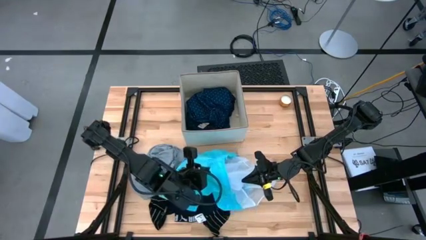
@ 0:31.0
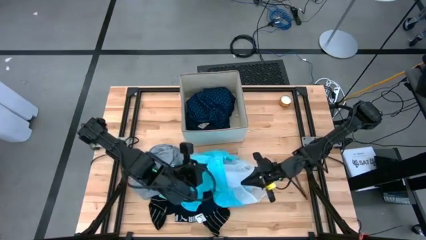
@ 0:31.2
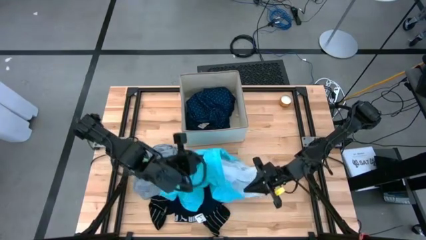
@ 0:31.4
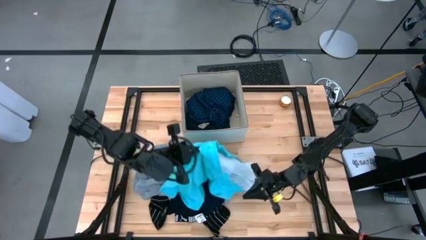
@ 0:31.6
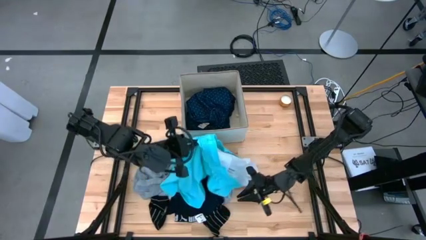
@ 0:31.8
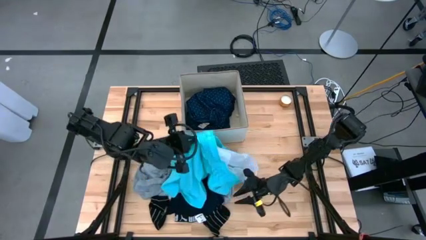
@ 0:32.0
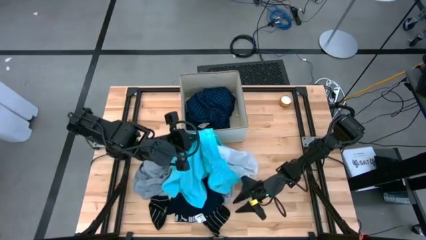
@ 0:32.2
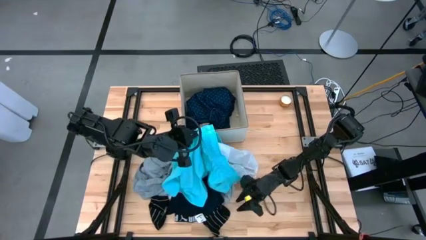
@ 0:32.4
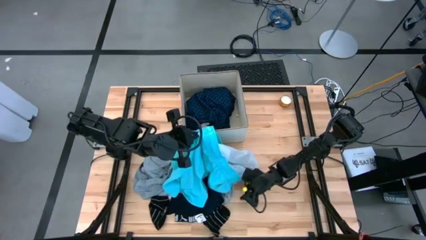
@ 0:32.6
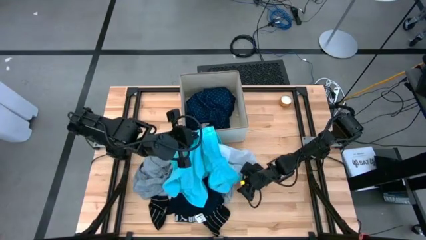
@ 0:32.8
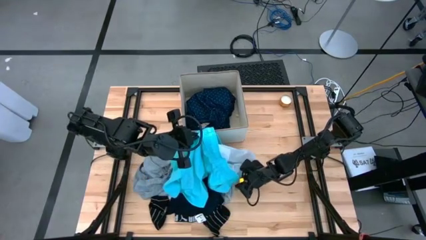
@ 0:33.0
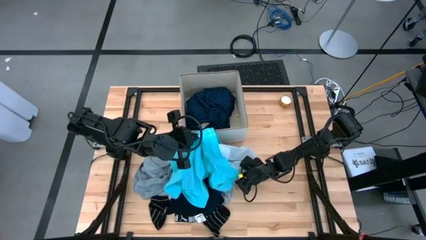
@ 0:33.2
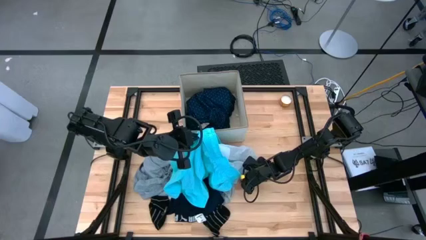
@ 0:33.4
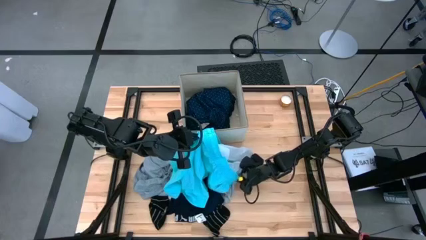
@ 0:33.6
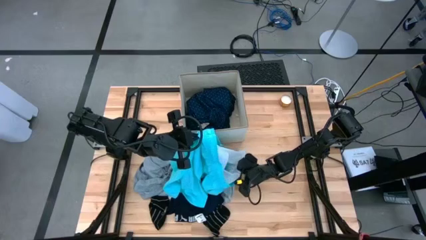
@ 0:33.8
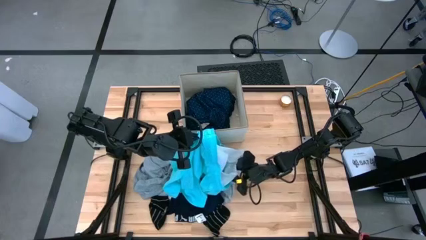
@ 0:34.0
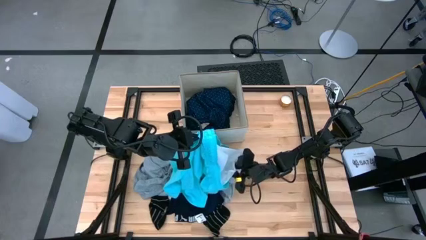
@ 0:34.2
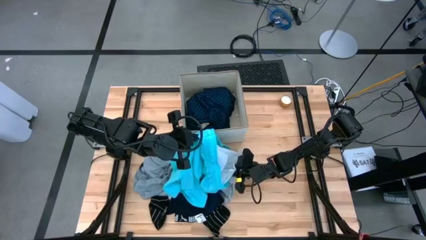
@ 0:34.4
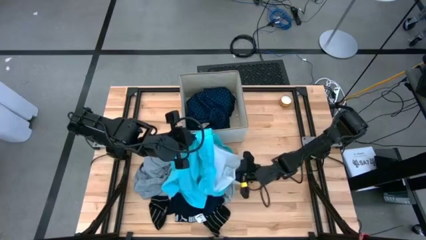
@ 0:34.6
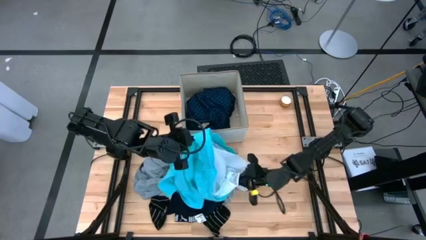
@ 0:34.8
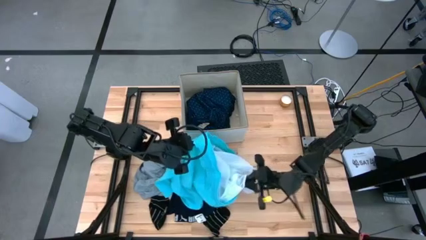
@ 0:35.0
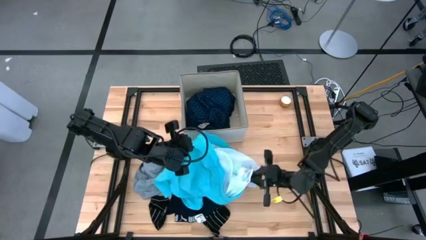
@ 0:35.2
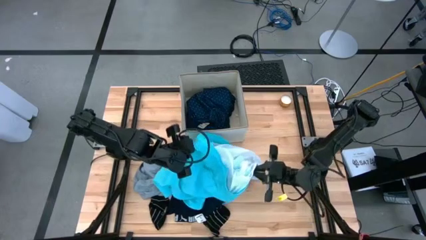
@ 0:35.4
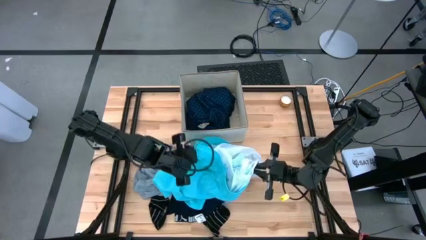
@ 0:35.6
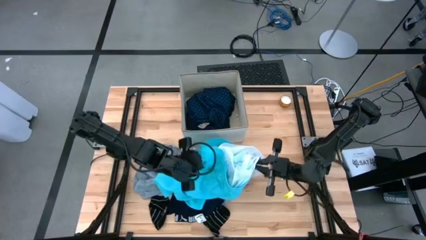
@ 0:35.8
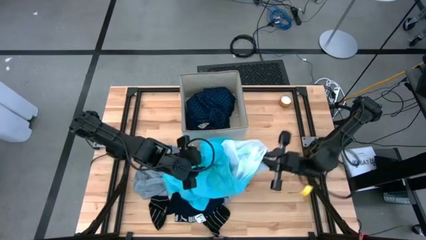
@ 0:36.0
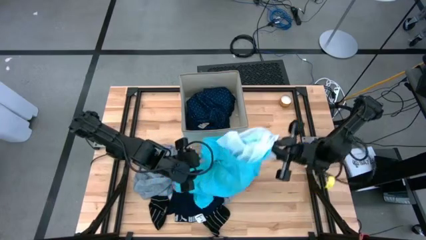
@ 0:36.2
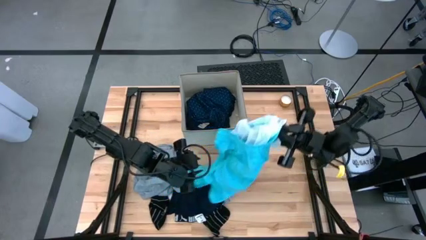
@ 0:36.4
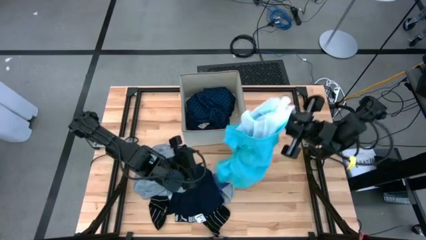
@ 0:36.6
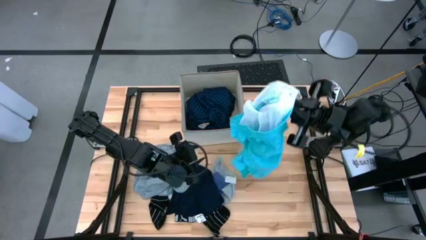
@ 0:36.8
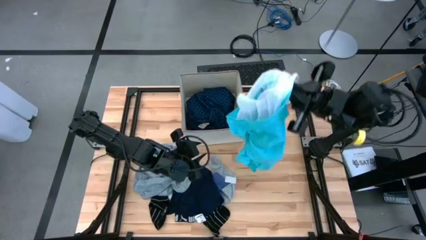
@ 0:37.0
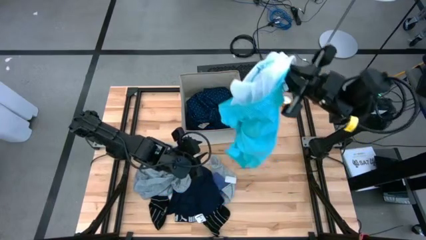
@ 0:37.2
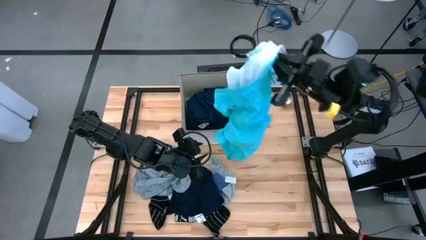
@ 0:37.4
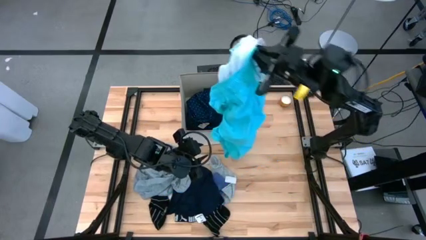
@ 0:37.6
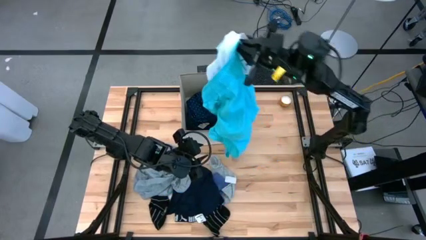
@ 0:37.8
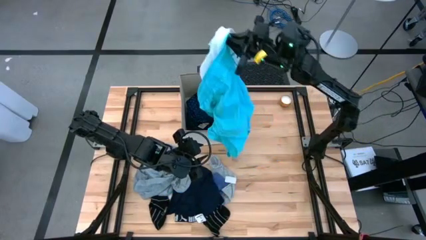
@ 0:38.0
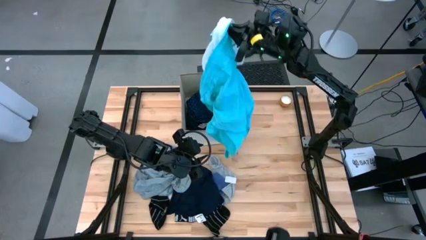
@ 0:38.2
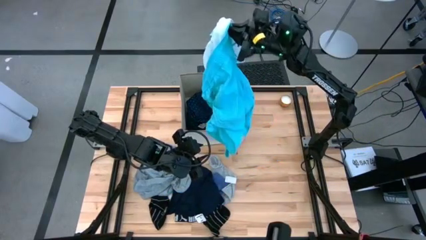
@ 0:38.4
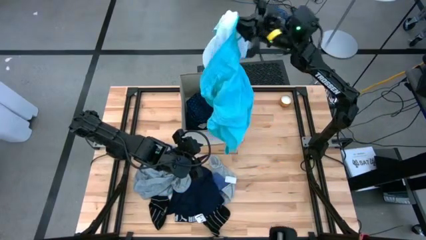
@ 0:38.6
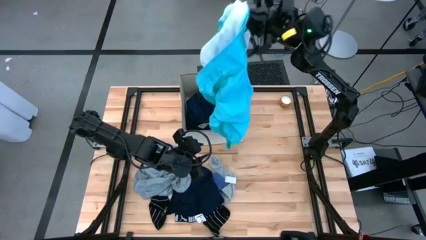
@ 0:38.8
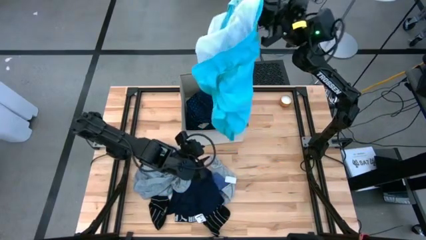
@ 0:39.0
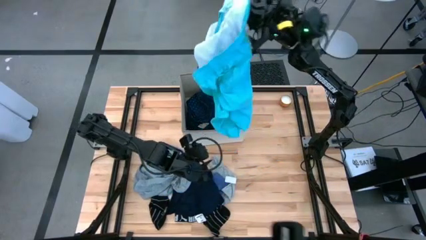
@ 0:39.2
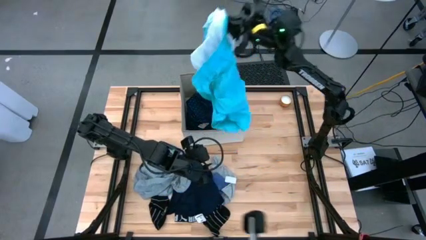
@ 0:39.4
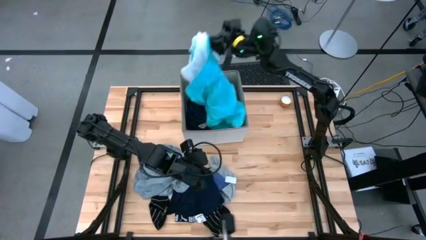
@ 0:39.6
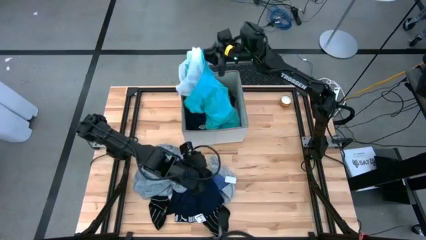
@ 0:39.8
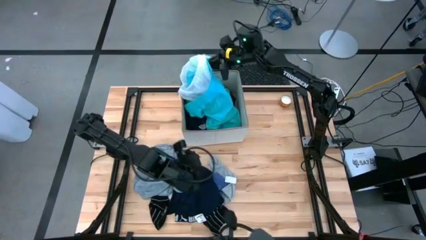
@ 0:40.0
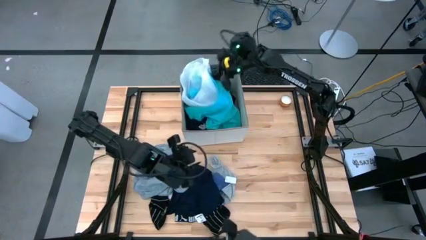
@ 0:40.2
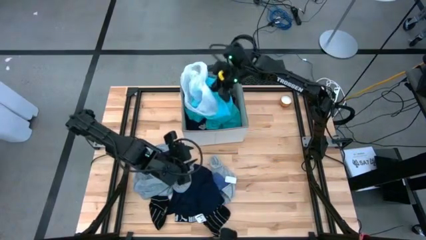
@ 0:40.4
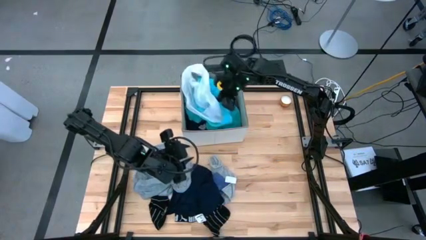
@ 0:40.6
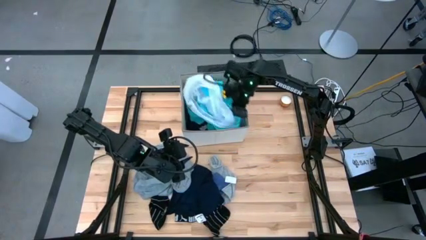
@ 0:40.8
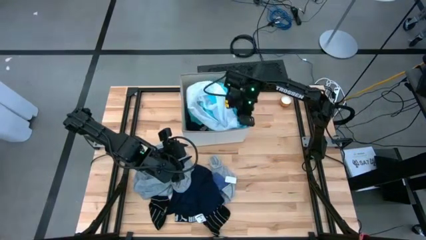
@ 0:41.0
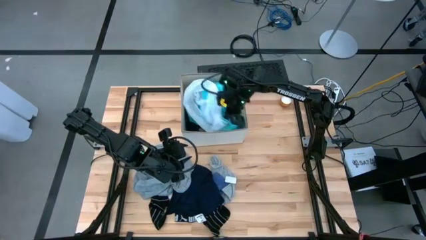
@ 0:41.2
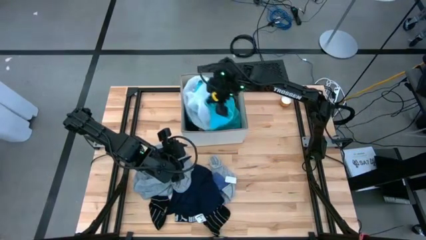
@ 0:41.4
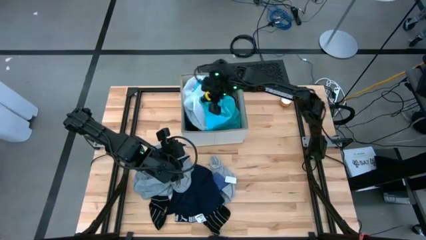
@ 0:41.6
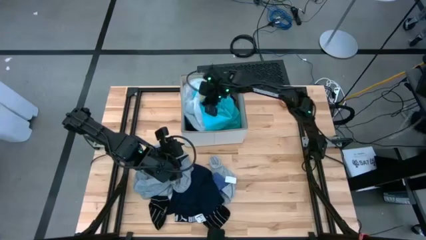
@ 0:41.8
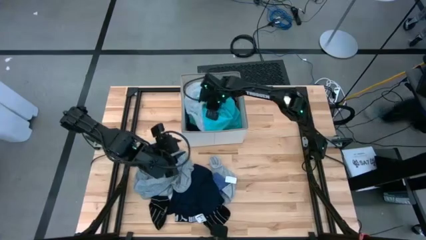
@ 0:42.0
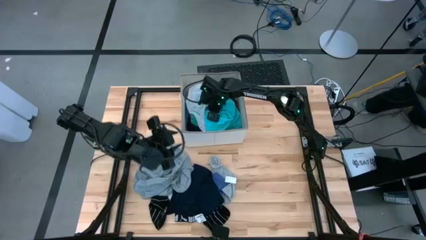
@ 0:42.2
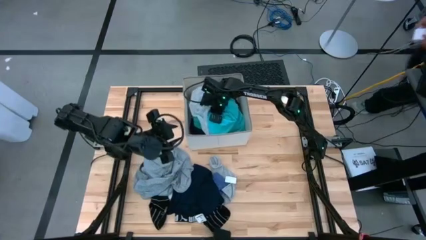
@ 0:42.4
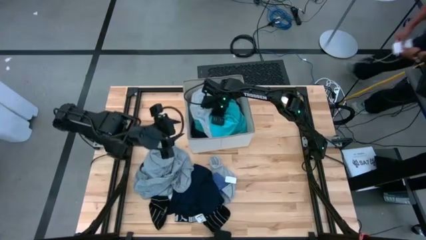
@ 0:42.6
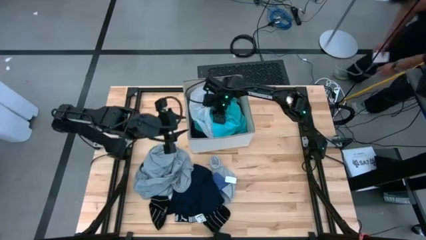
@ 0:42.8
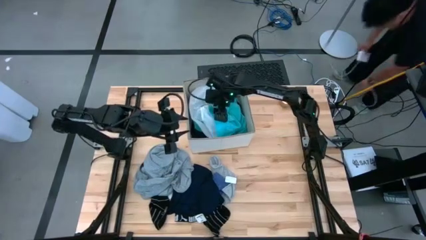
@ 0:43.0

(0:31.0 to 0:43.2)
Task: Sort clothes
Put the light blue shorts into the laundry bin

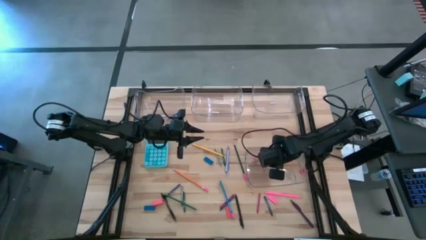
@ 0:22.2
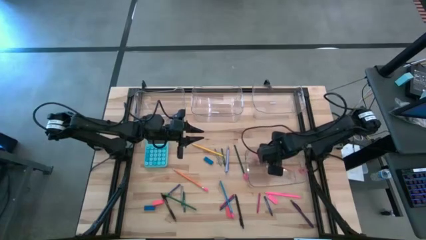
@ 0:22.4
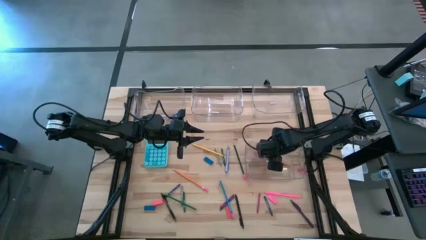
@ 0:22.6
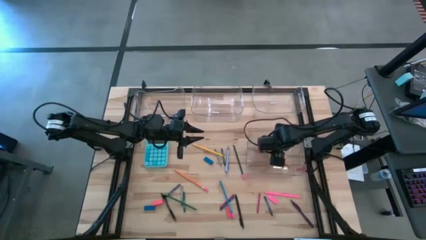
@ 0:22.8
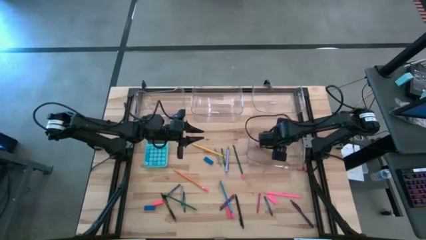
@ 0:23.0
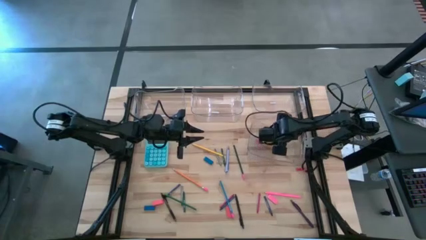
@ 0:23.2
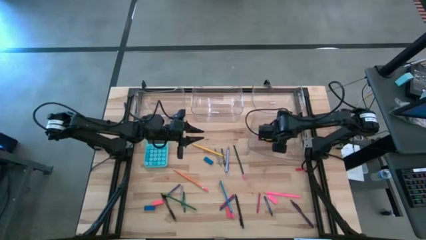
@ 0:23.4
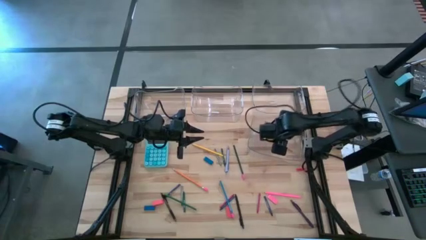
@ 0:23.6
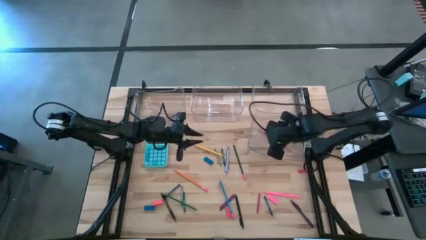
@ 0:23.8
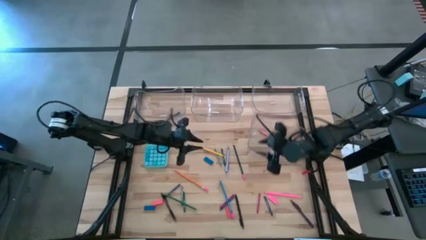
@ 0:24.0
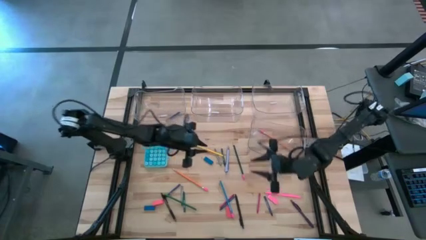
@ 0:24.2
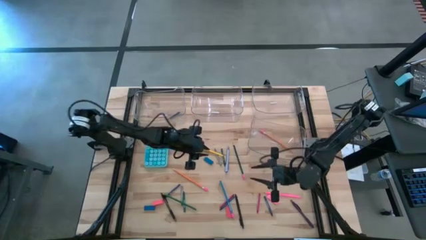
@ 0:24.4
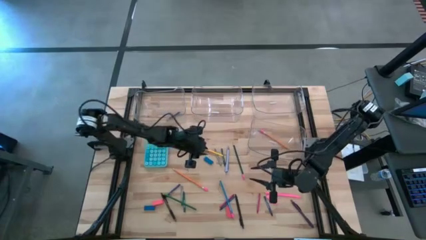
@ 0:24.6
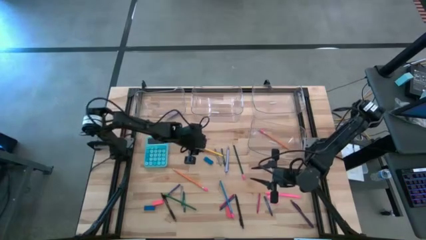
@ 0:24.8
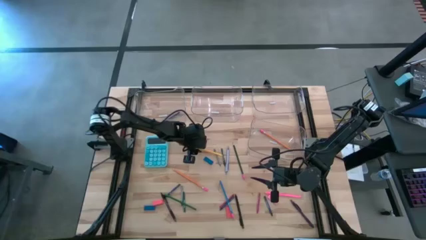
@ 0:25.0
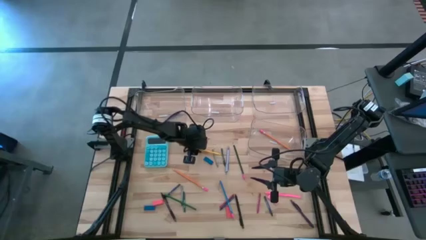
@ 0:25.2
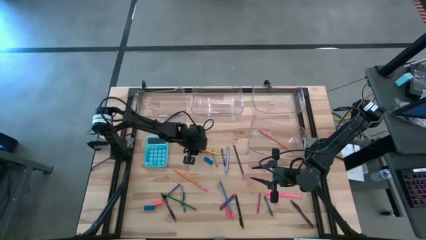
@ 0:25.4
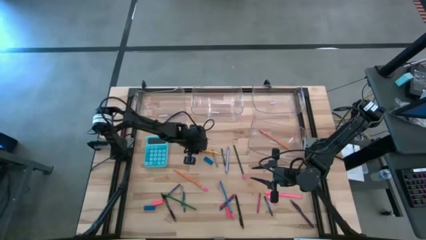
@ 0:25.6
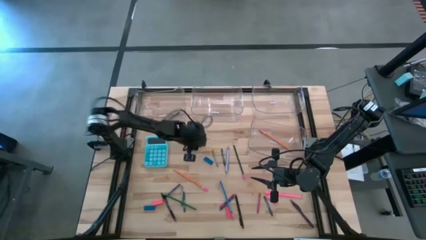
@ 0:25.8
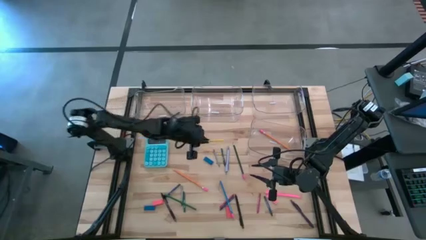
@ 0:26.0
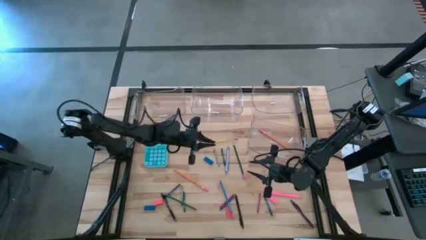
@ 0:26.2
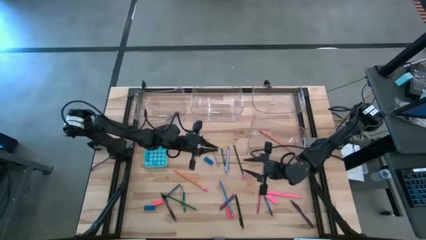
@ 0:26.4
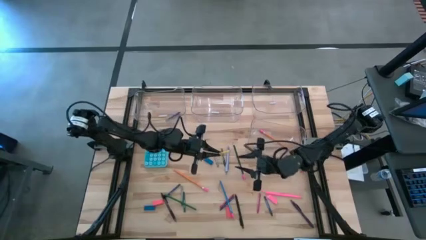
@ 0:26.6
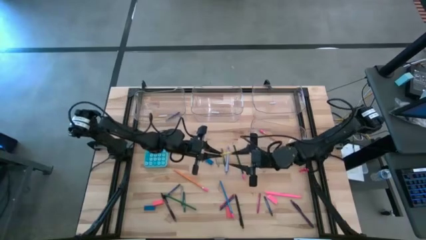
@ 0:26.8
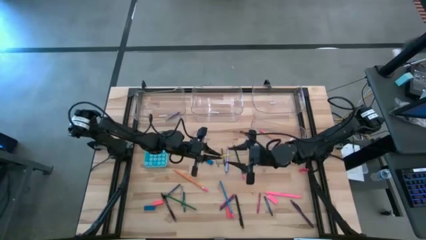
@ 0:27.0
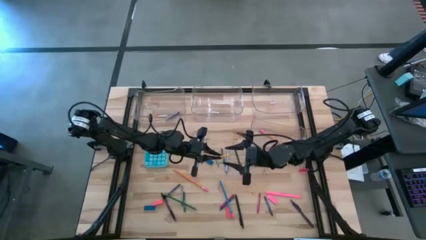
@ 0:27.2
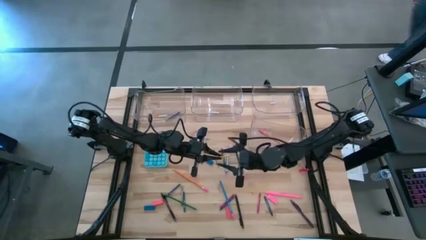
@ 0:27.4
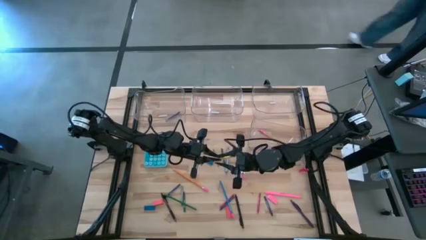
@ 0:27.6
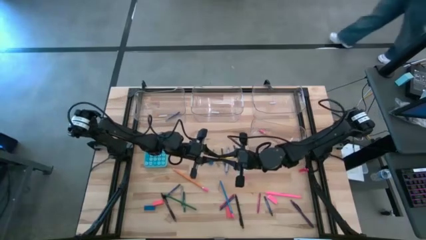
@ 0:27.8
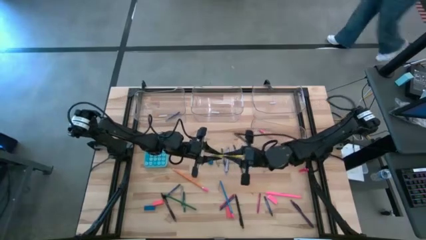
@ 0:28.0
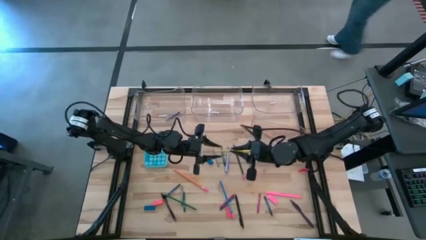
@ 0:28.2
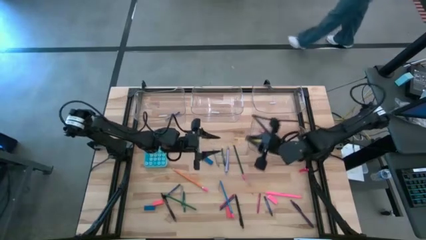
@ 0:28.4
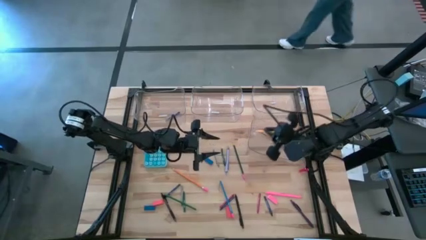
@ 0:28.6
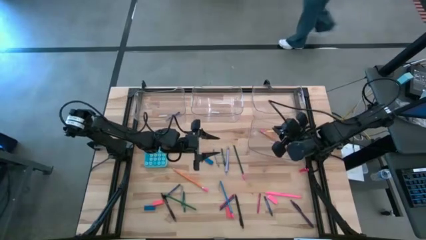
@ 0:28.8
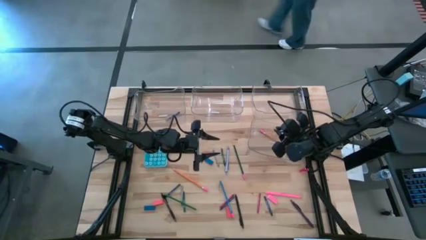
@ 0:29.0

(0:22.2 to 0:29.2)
Task: Sort crayons/erasers/pens/pencils in bins
Put the yellow pencil into the bottom transparent bin
